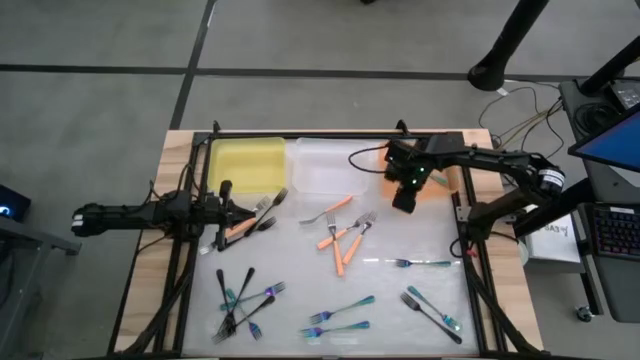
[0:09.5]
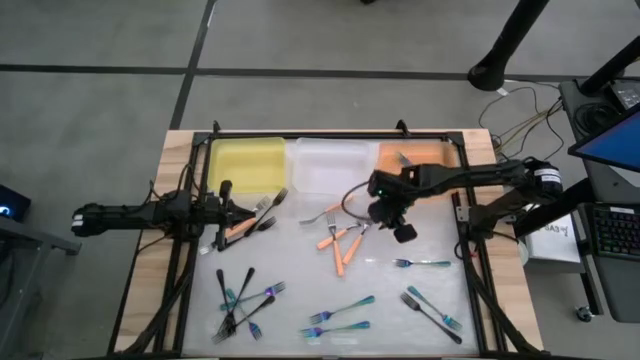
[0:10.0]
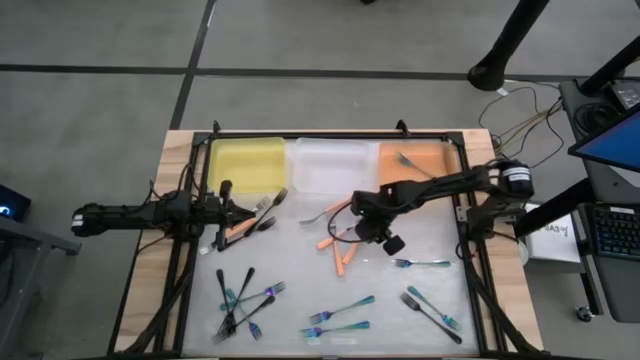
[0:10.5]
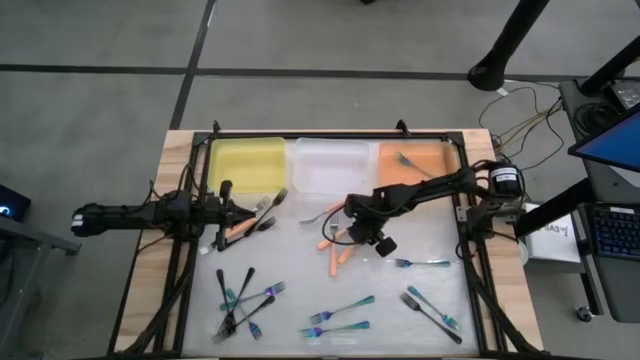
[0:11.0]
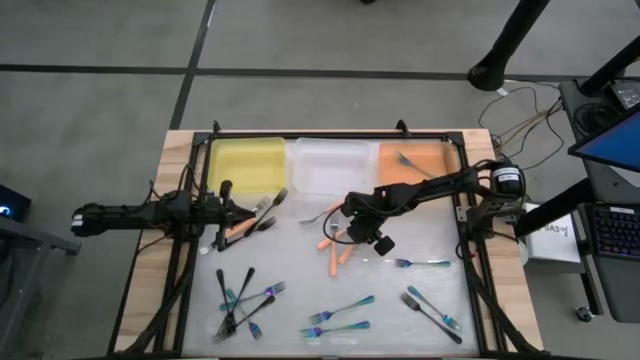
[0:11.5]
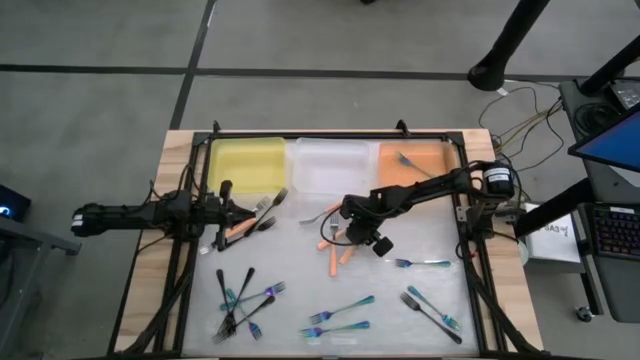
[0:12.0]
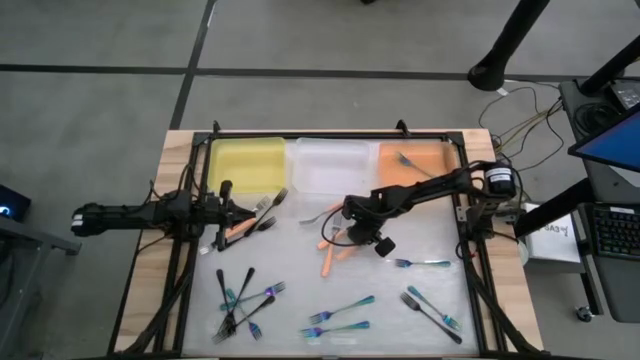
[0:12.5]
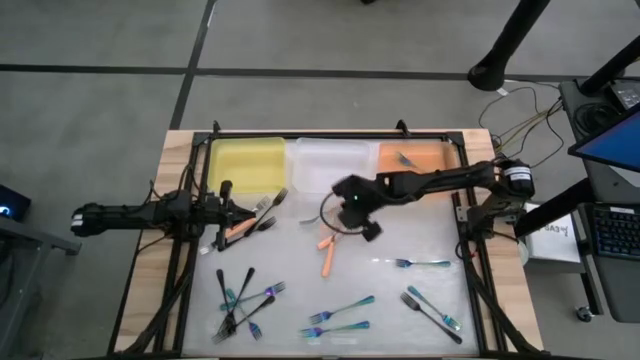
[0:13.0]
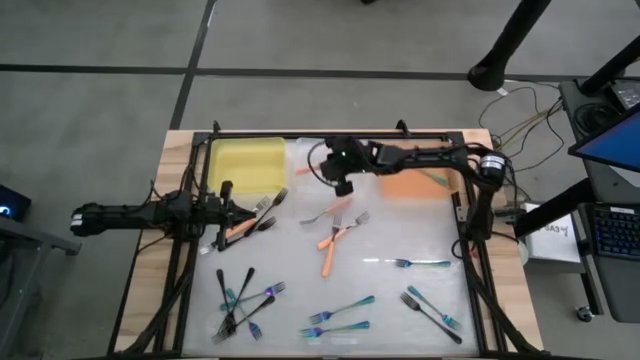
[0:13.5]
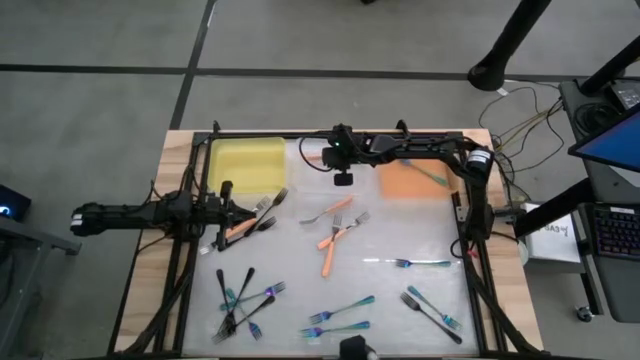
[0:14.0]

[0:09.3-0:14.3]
Task: Sort silverware by color (type)
Put the orange fork into the transparent bin

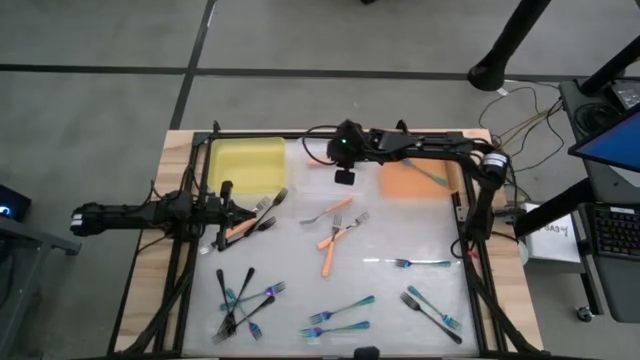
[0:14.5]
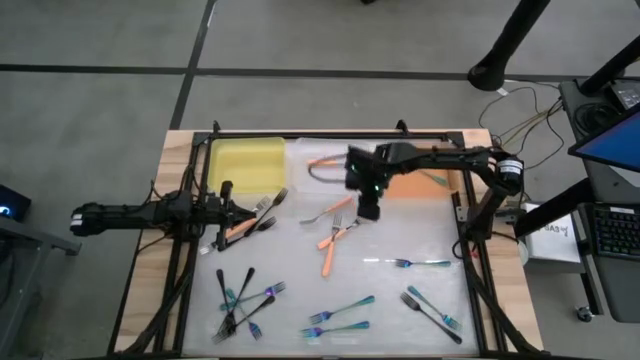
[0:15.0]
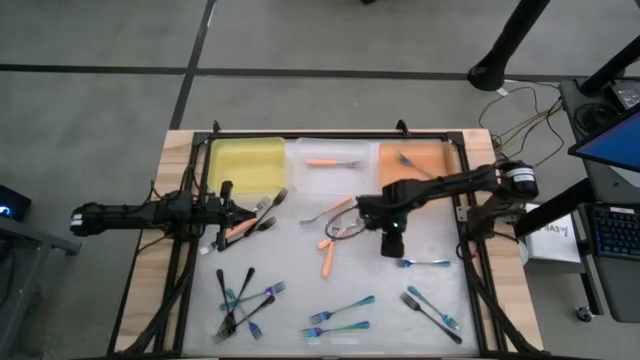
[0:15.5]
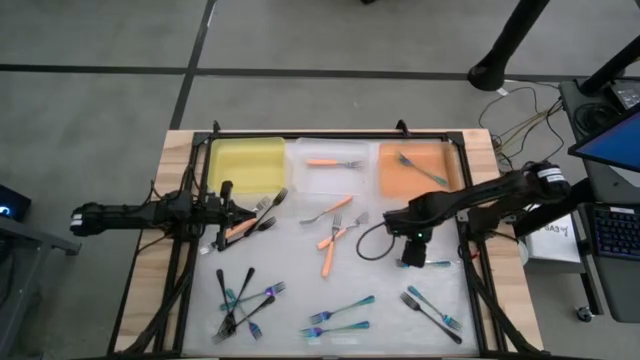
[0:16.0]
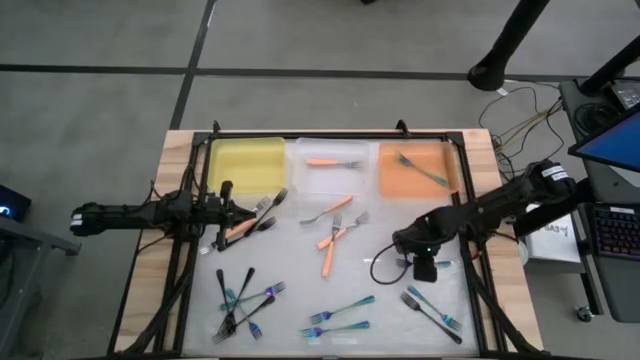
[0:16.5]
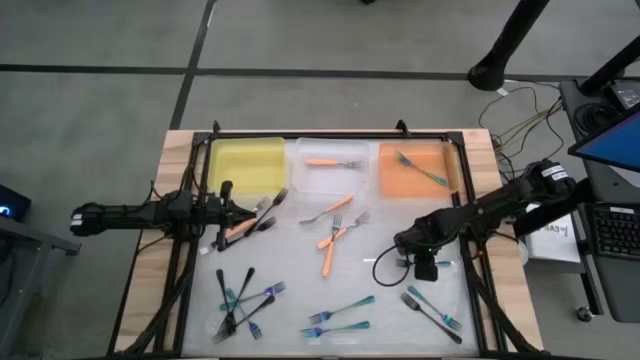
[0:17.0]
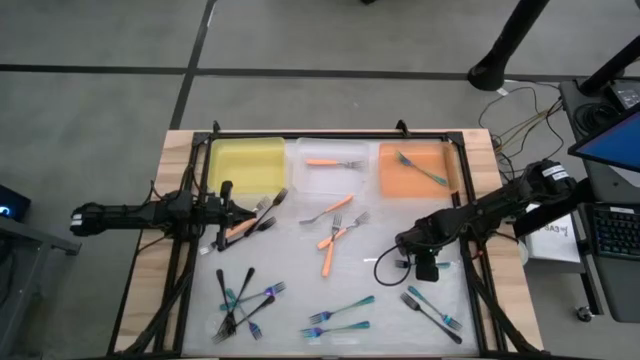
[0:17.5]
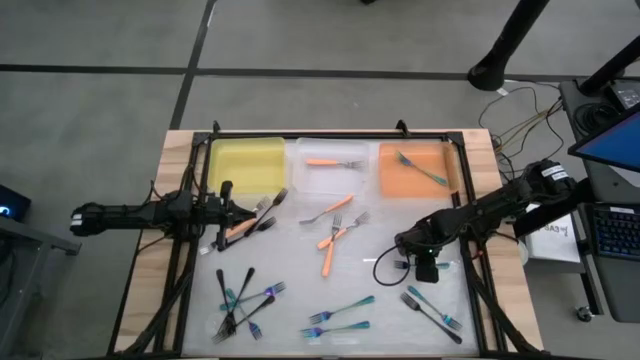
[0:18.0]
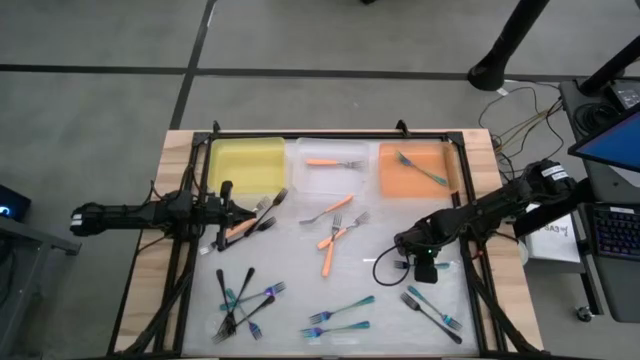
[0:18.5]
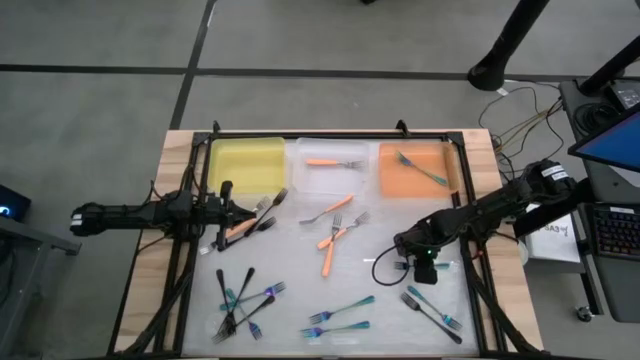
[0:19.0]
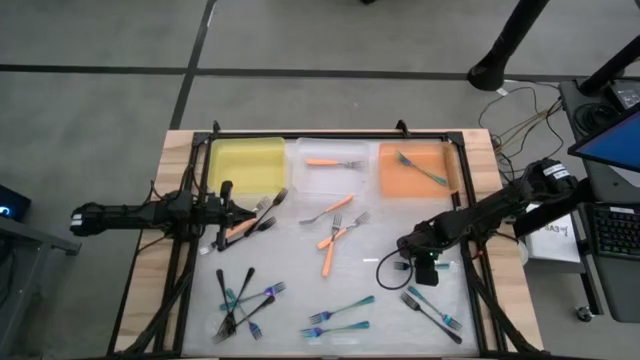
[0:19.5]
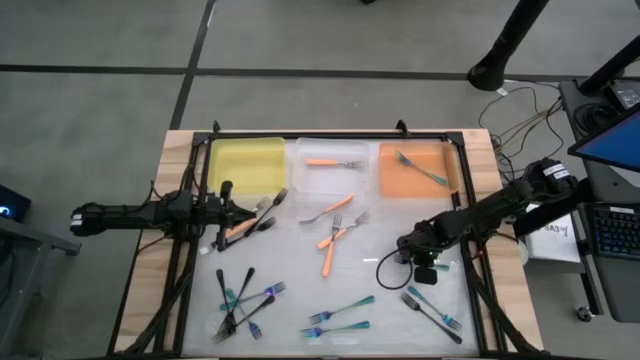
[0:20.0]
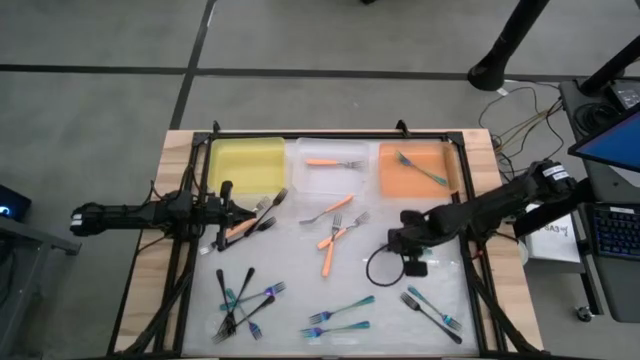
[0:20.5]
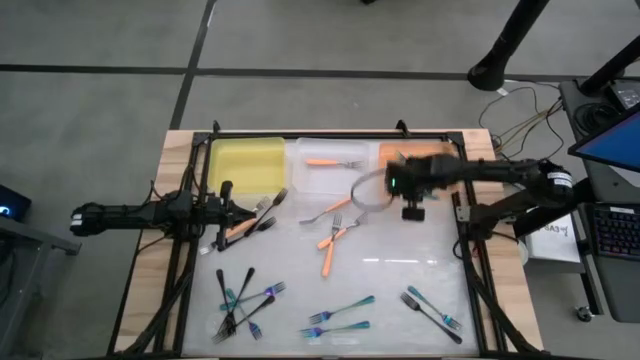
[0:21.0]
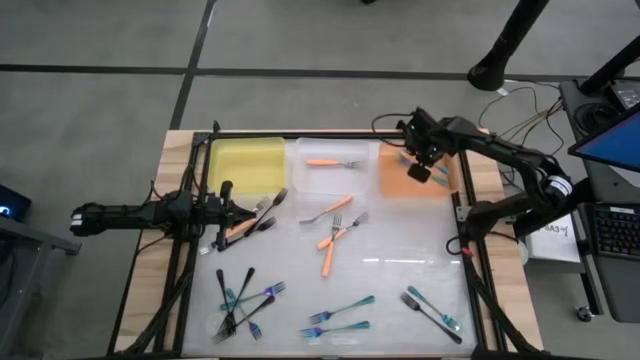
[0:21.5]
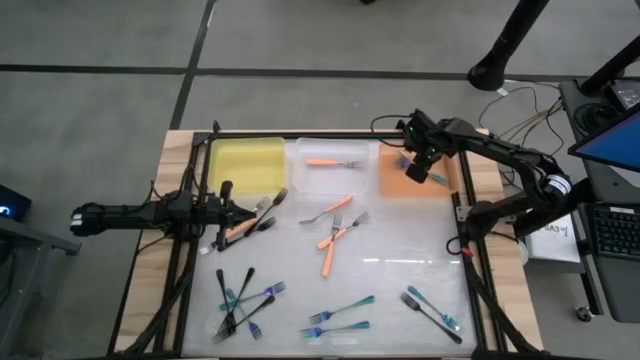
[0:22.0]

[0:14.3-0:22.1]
Put the iridescent fork into the orange bin

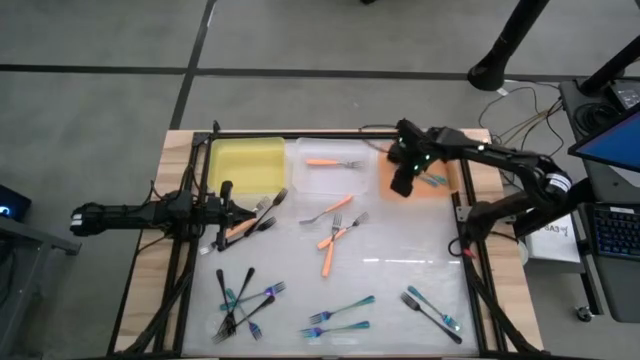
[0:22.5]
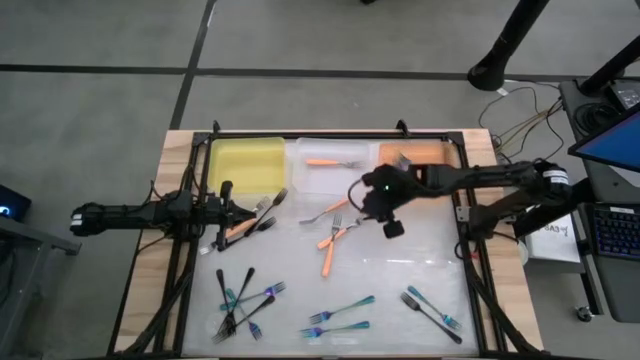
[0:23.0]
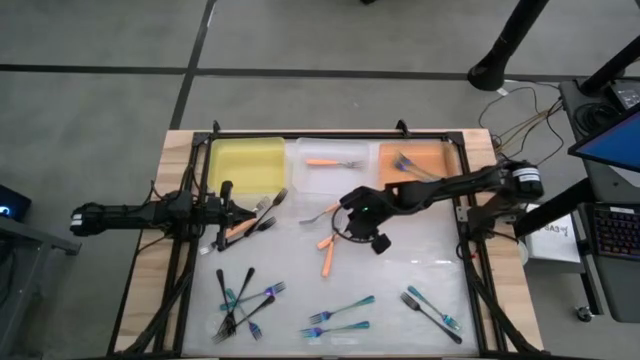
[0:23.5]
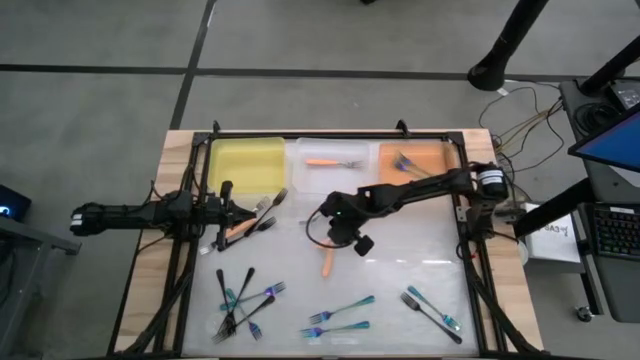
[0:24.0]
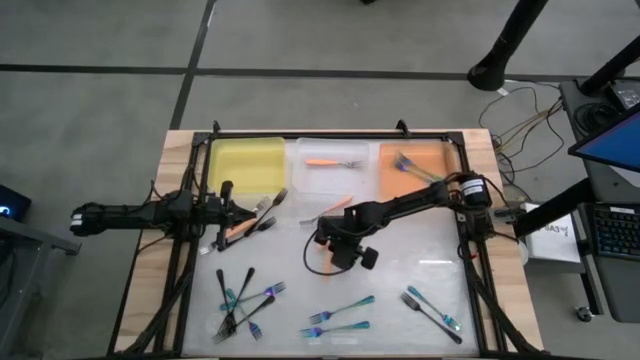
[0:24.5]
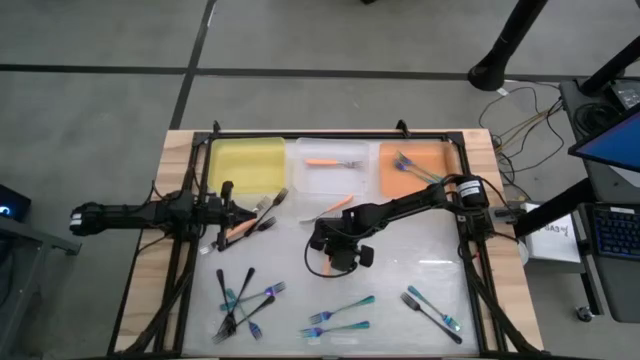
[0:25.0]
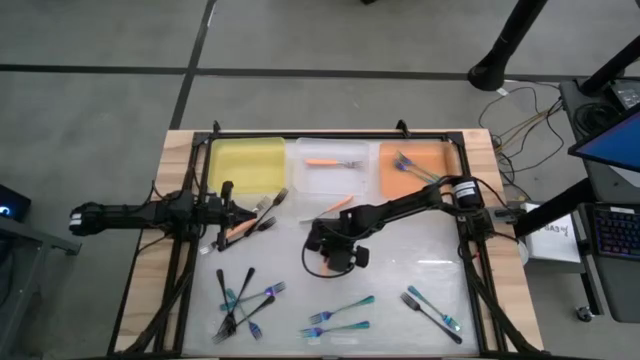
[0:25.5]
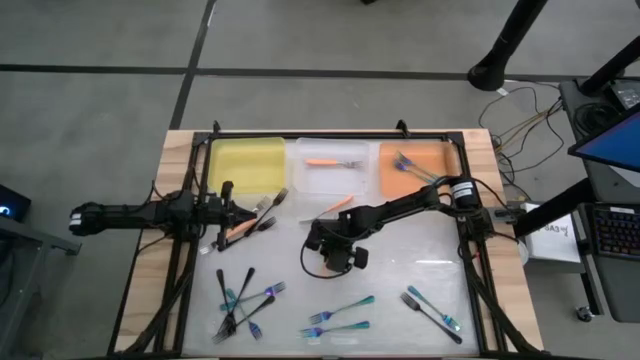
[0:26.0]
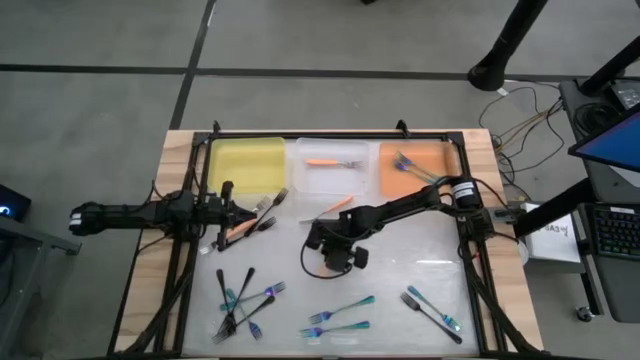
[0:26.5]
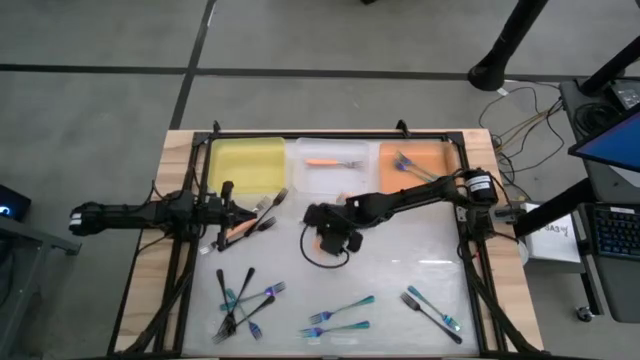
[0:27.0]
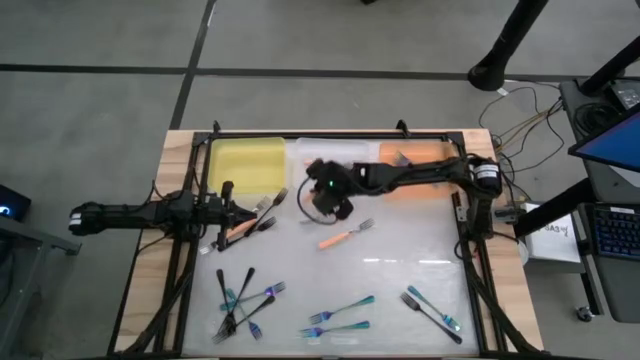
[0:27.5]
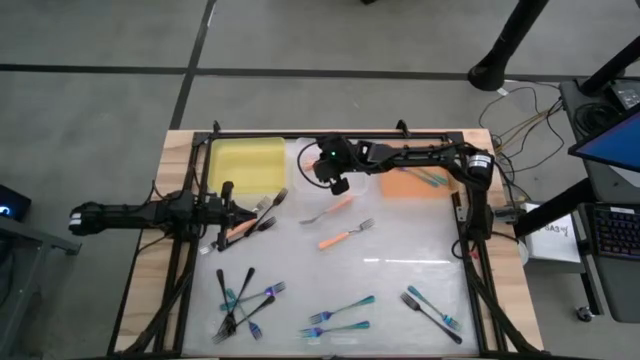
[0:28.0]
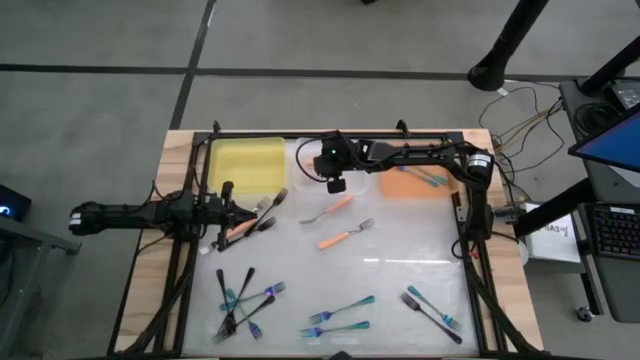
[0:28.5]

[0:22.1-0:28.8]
Put the orange fork into the transparent bin

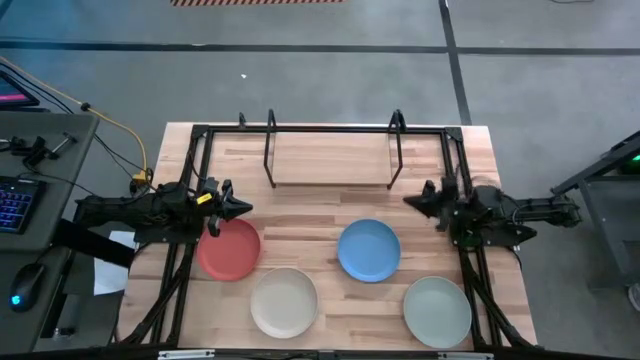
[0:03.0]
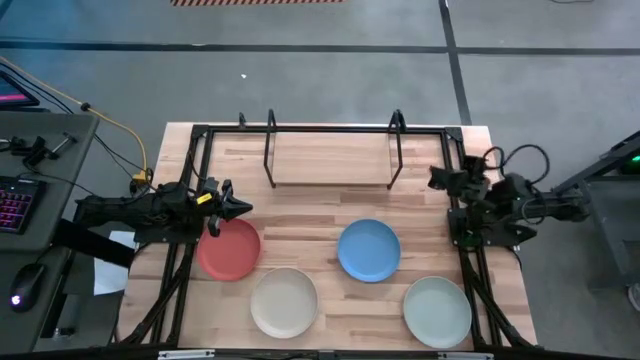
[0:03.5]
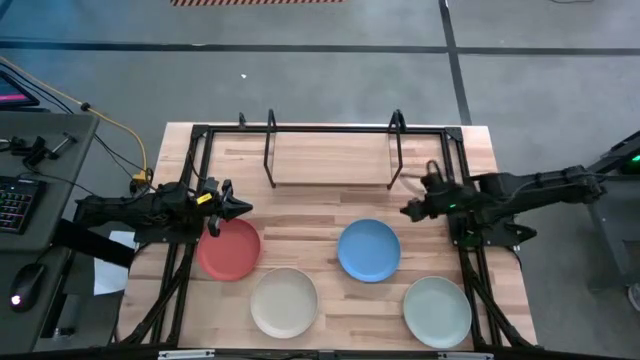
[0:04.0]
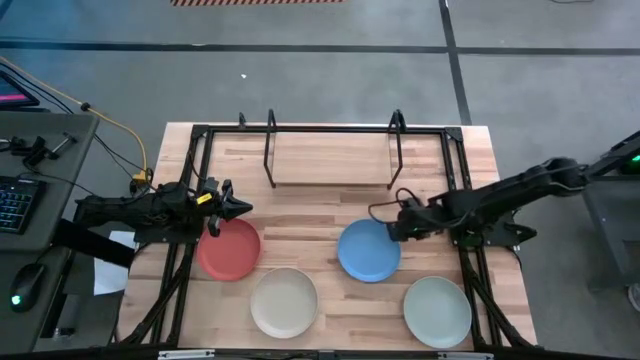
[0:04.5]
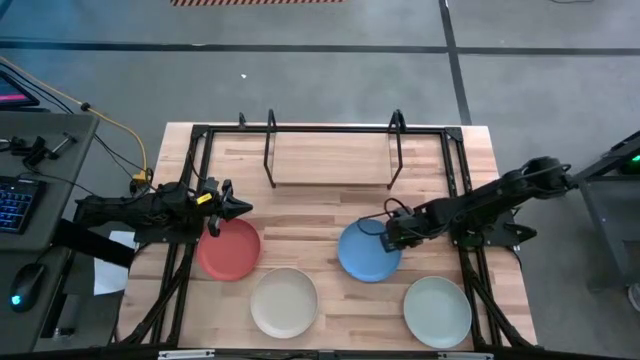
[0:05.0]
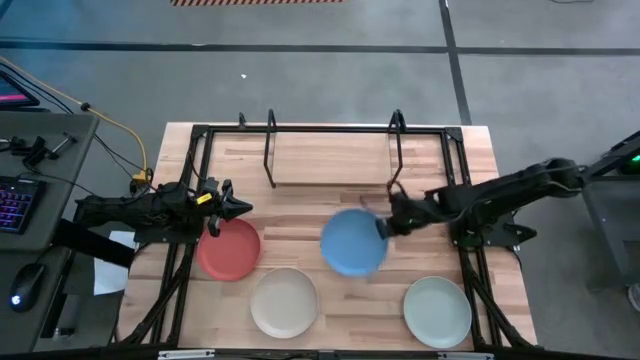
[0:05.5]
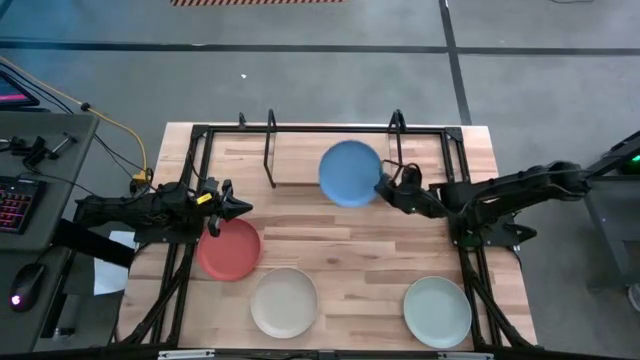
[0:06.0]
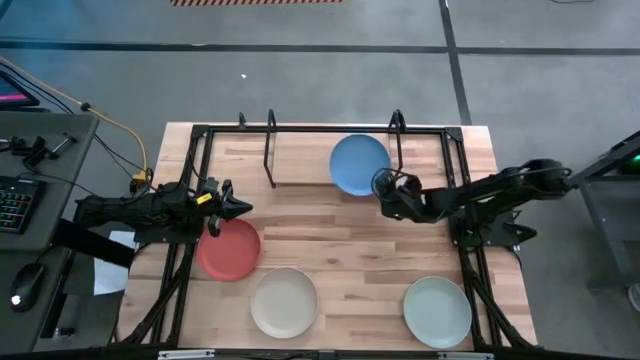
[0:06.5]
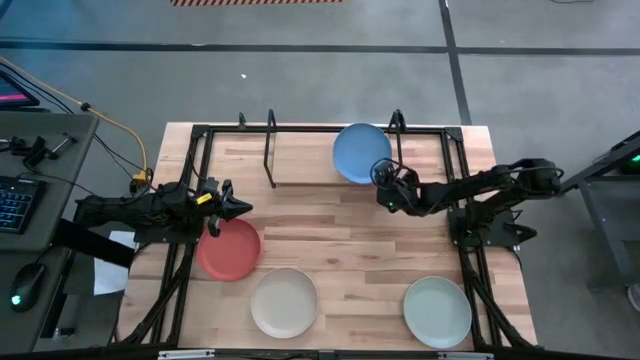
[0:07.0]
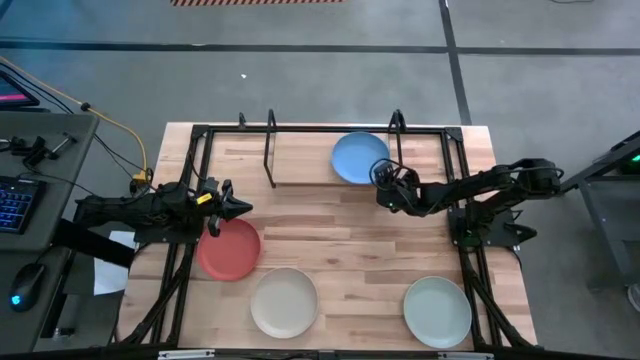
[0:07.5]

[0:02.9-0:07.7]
Task: Place and stack plates onto a shelf
Put the blue plate on the shelf
